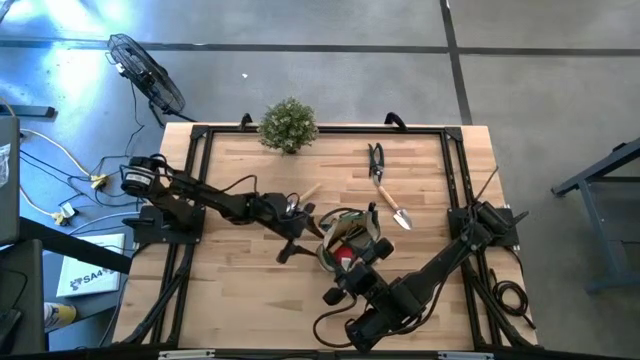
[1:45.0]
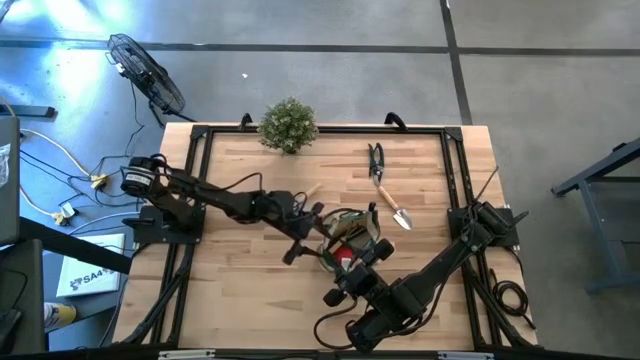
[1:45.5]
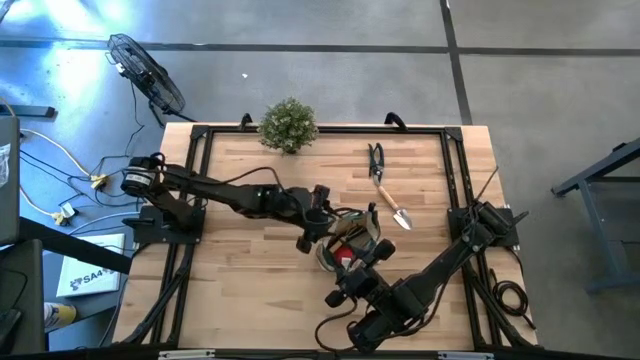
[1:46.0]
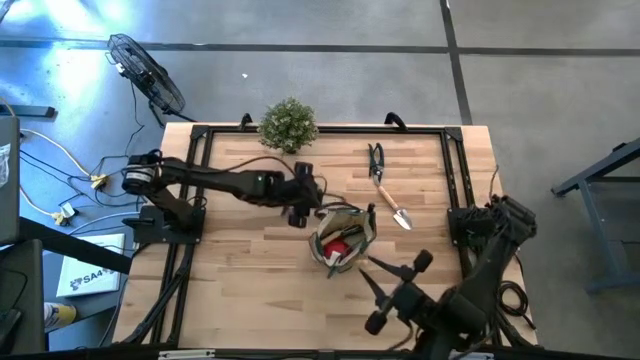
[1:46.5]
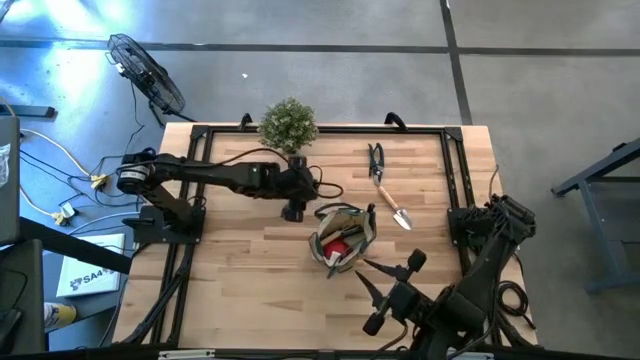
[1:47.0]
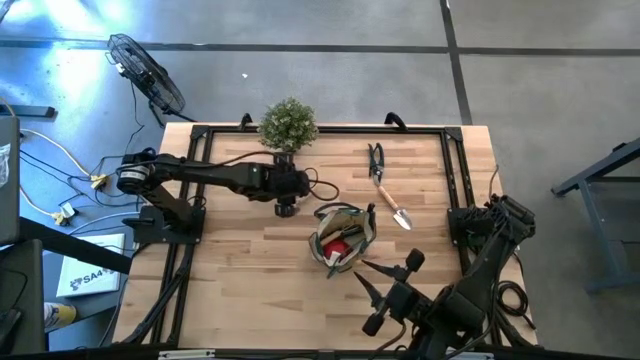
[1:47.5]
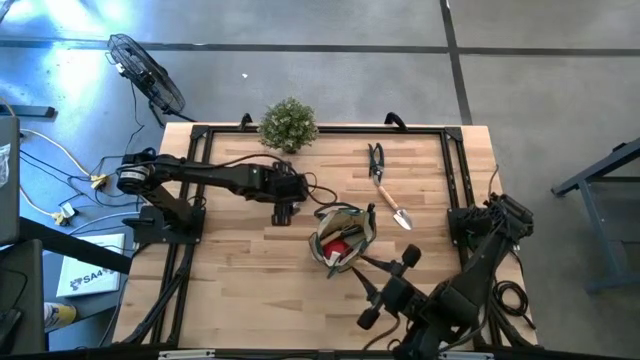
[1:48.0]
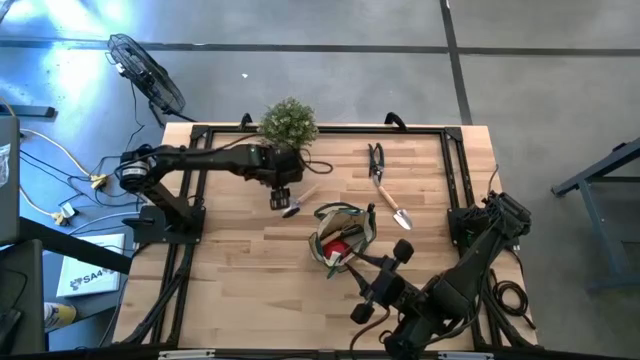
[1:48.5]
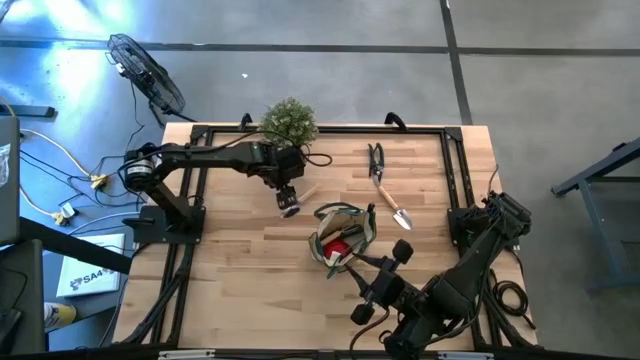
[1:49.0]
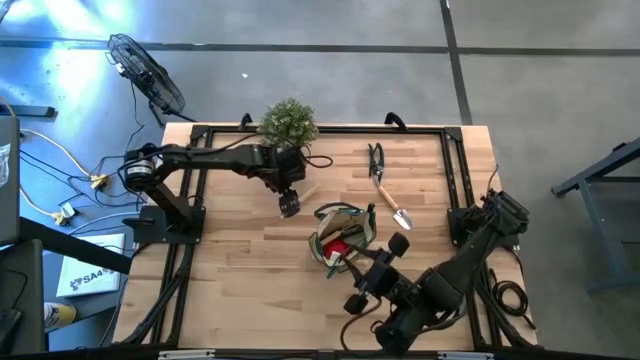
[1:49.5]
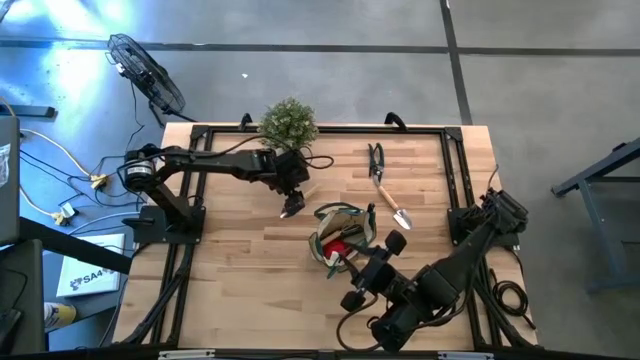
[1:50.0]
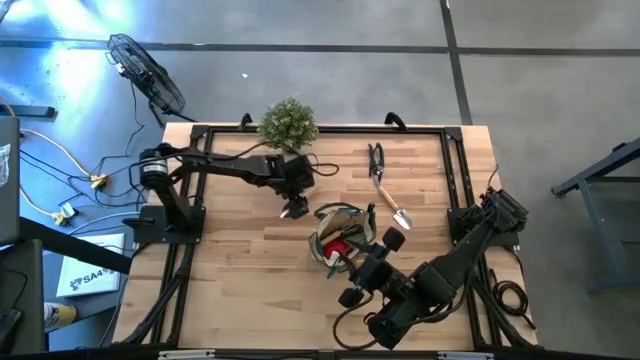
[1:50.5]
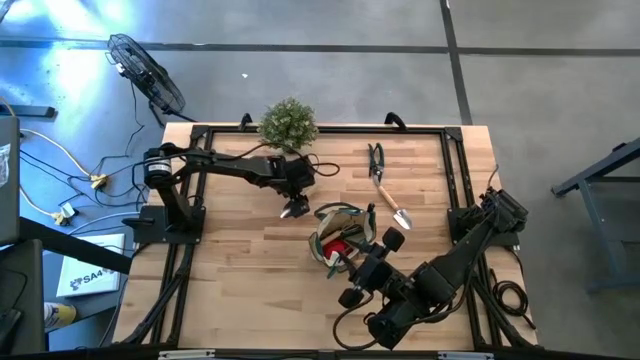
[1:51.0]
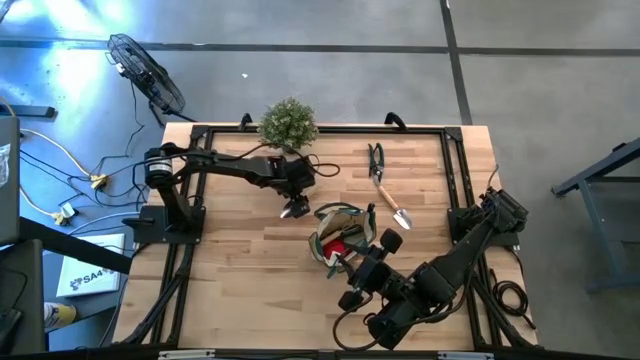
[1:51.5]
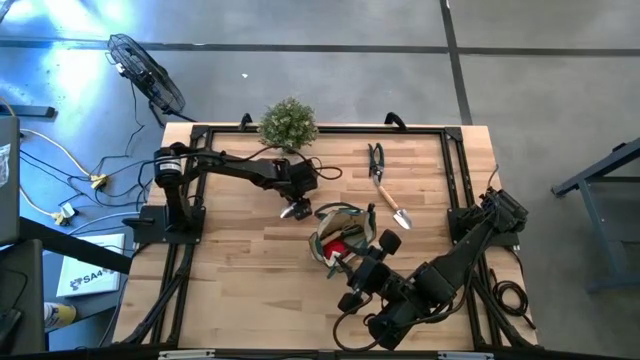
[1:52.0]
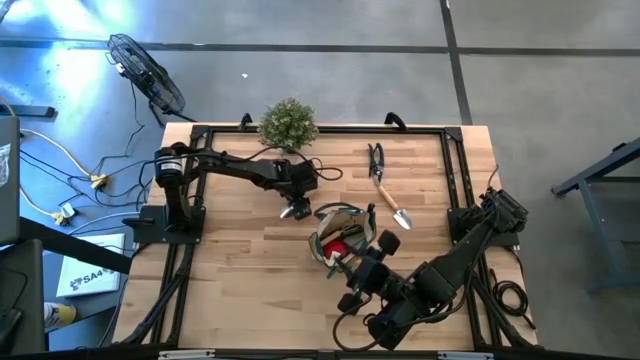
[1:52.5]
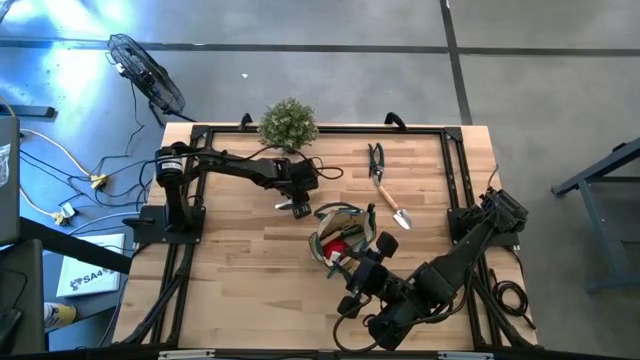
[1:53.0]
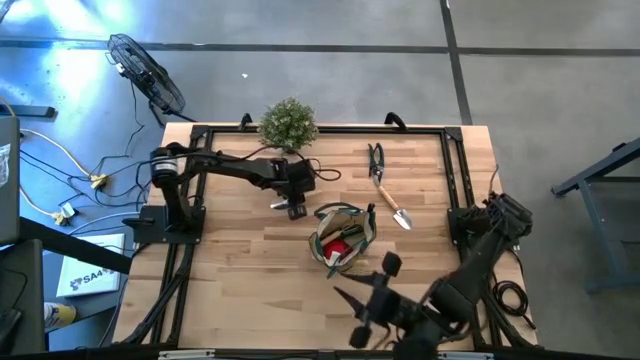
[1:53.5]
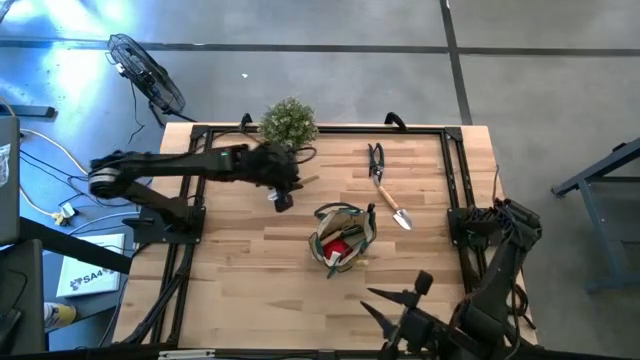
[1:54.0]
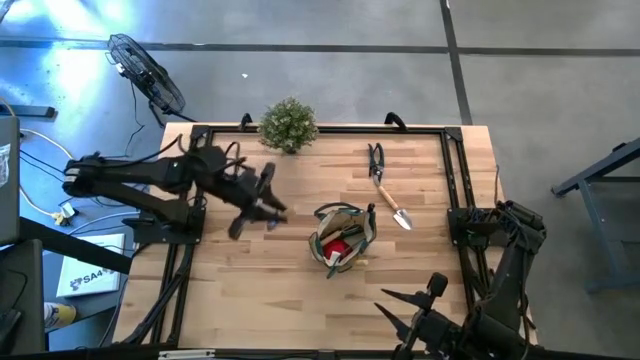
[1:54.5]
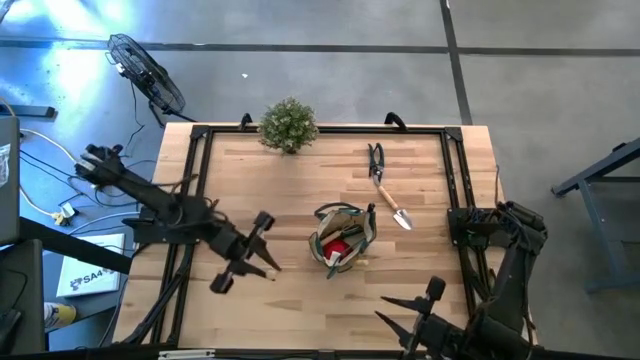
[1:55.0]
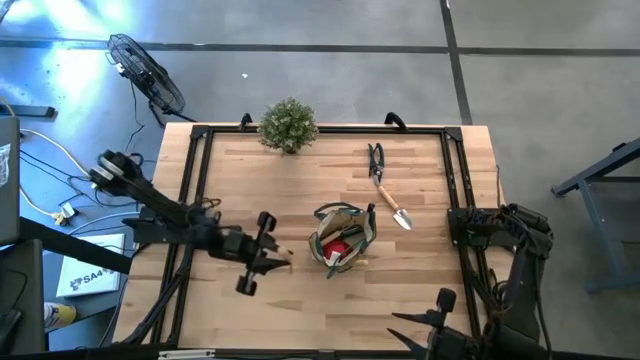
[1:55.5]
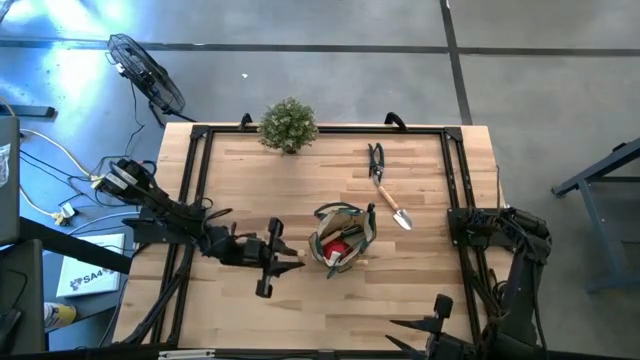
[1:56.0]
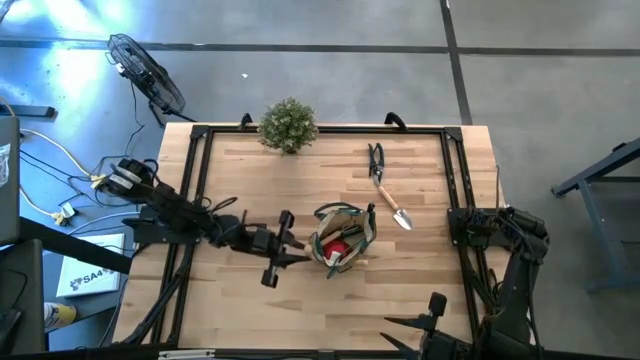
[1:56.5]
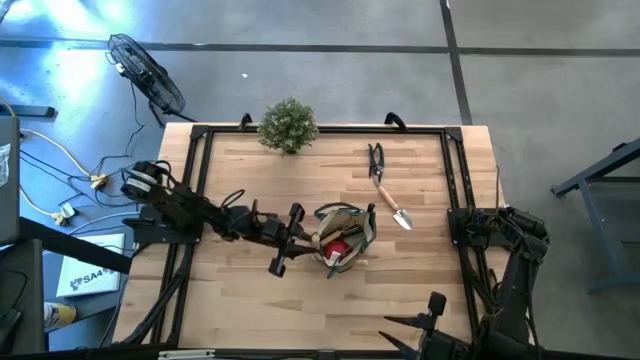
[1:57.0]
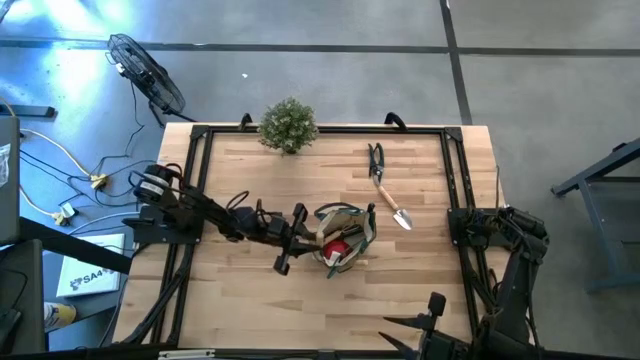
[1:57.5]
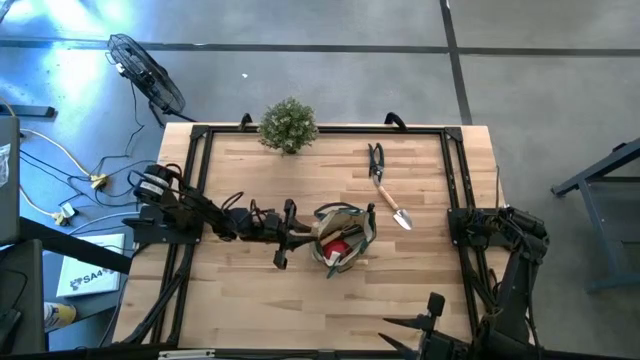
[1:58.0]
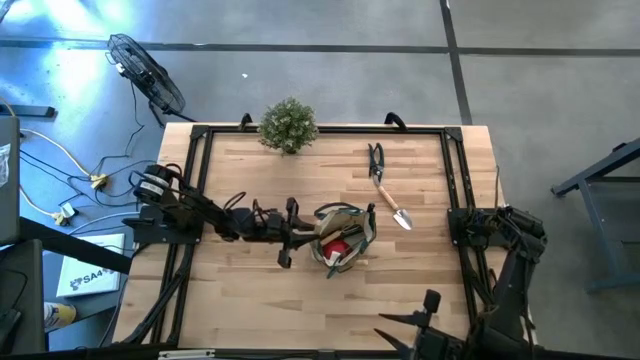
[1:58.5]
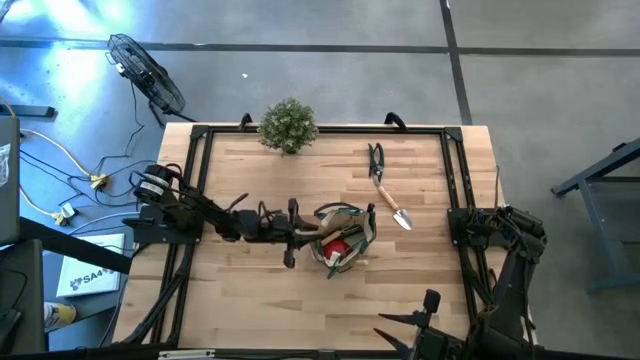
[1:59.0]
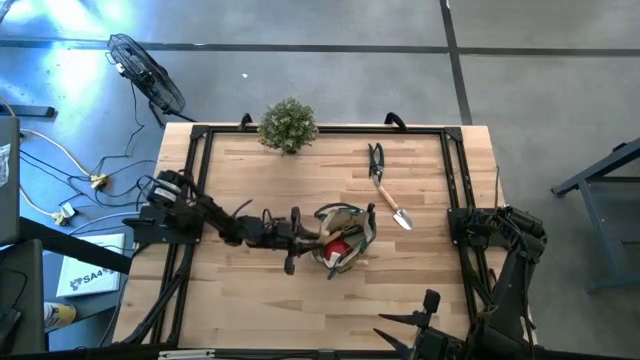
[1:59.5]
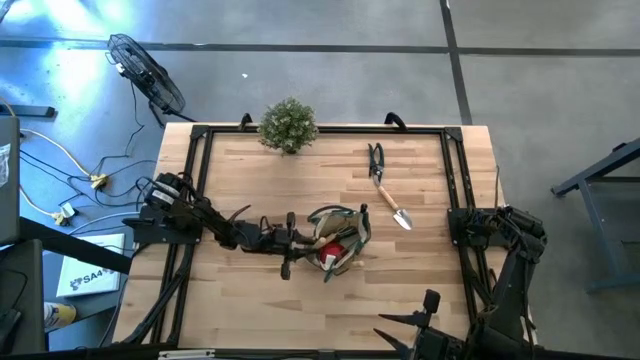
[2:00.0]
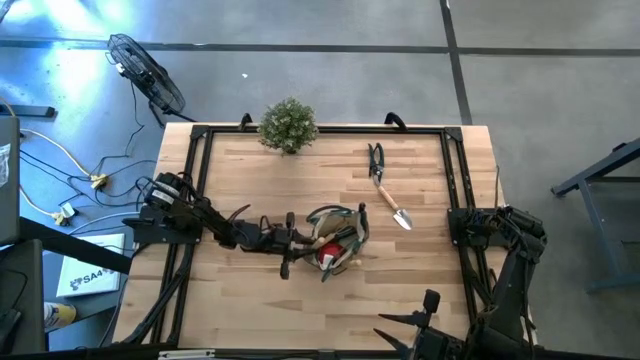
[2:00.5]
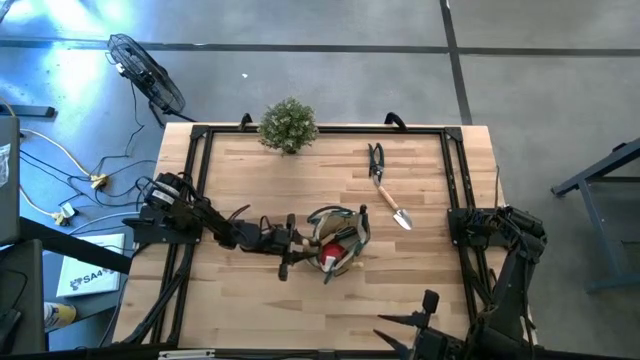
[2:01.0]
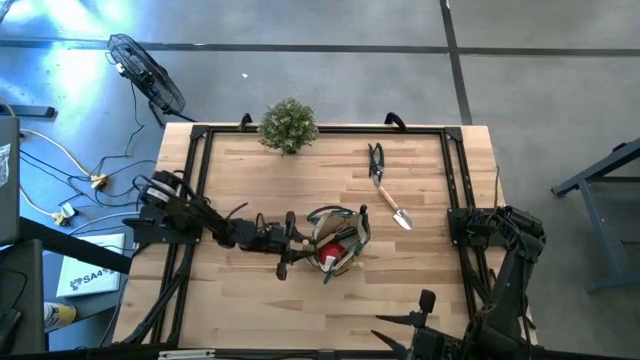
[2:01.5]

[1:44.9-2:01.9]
Task: Pick & Place Garden tools in Gardening bag
Put the left brown trowel into the green bag

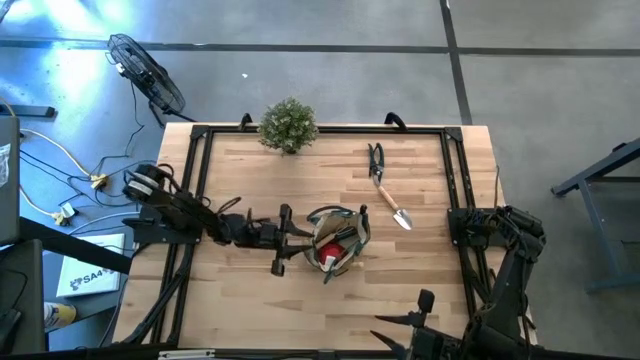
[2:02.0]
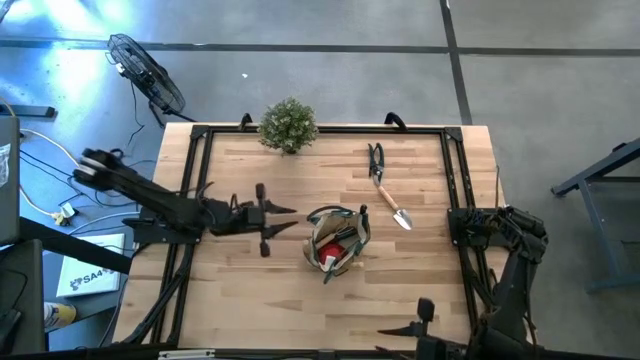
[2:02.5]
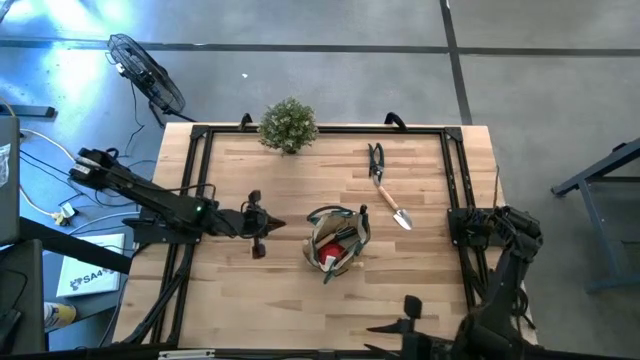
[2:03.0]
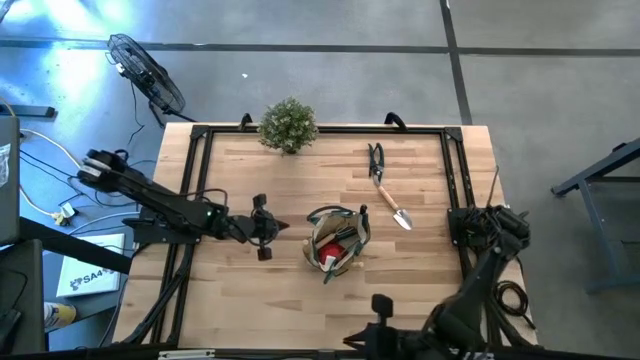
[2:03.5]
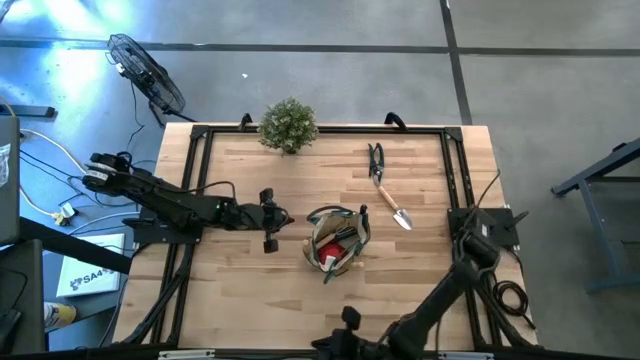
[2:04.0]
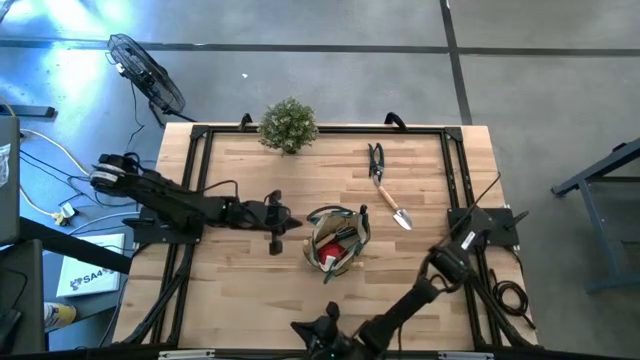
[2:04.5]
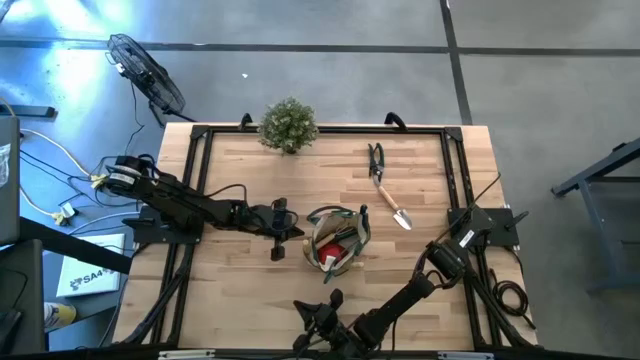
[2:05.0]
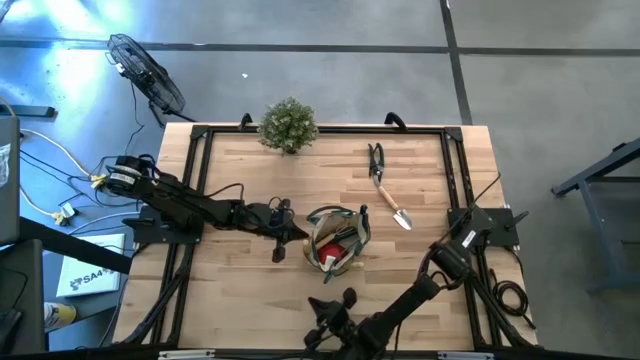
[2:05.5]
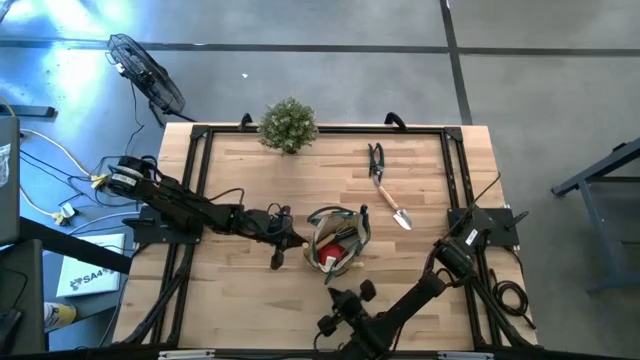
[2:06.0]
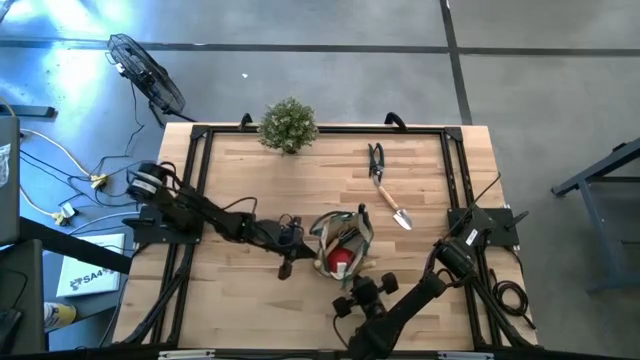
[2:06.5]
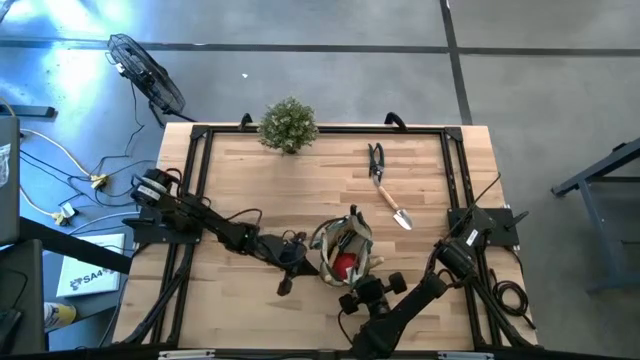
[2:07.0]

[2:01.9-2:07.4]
Adjust the green bag
